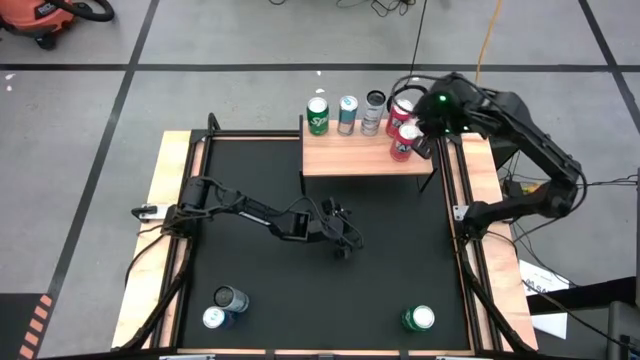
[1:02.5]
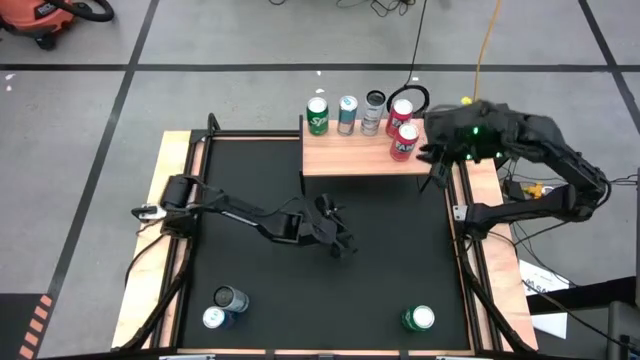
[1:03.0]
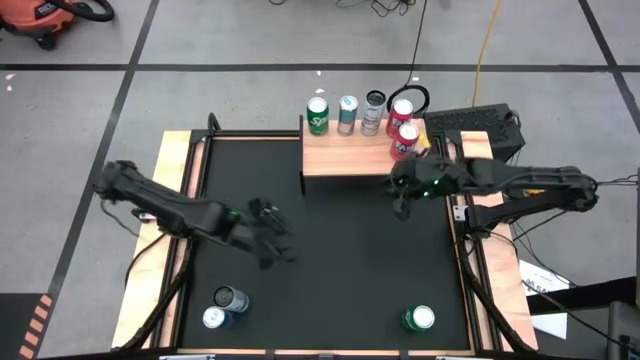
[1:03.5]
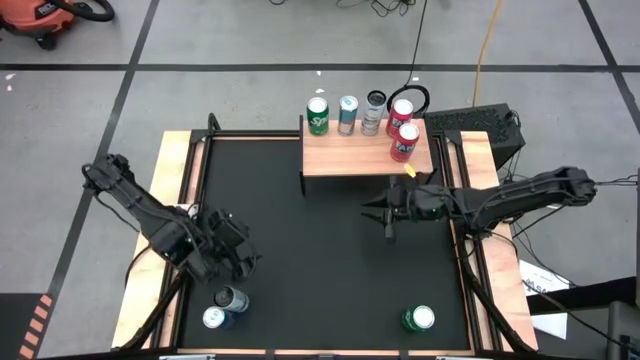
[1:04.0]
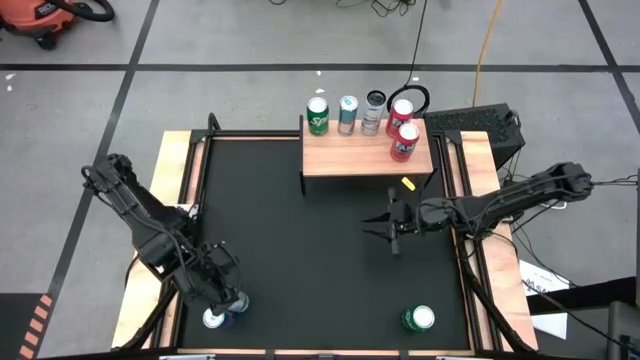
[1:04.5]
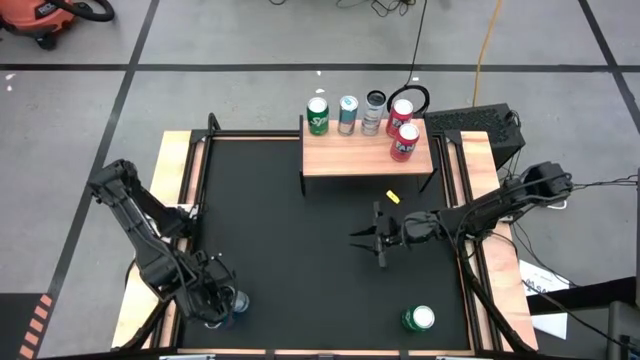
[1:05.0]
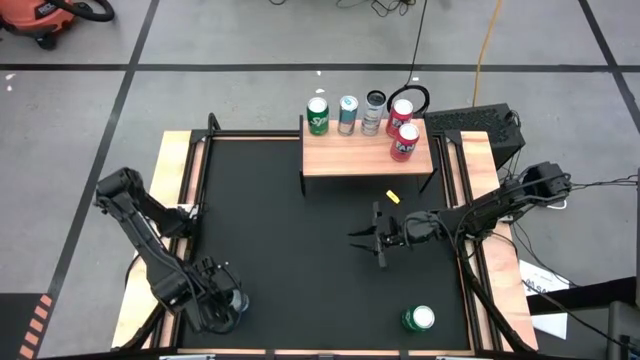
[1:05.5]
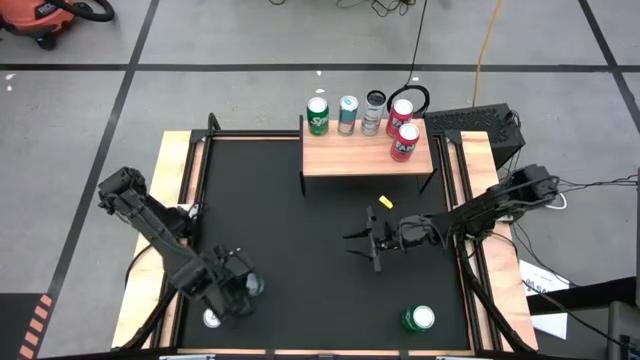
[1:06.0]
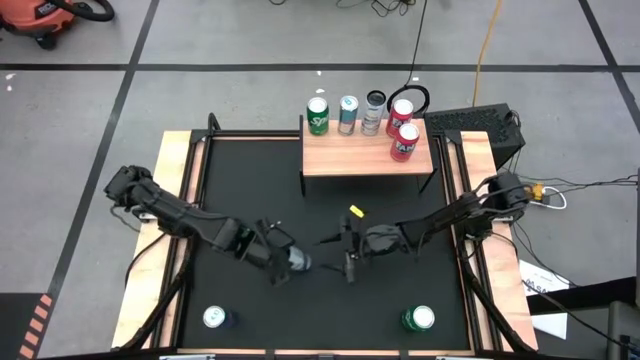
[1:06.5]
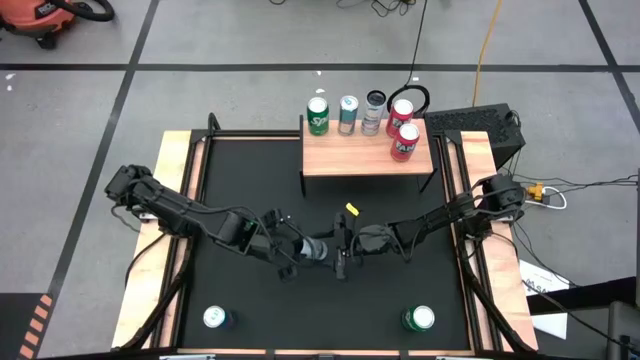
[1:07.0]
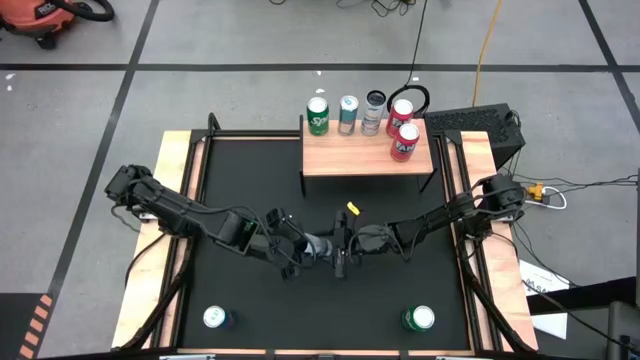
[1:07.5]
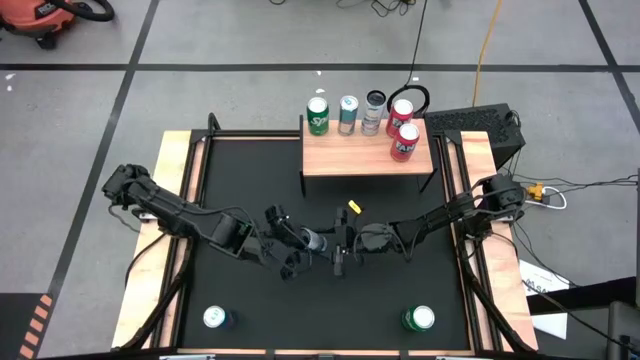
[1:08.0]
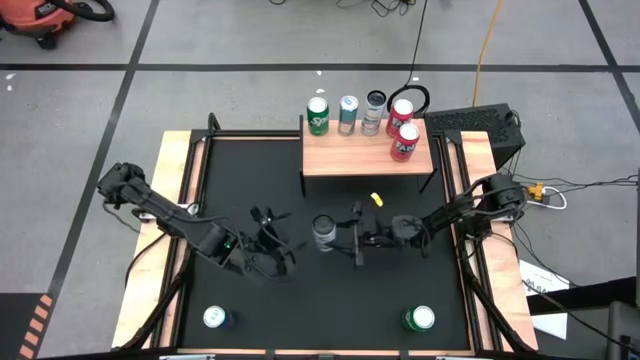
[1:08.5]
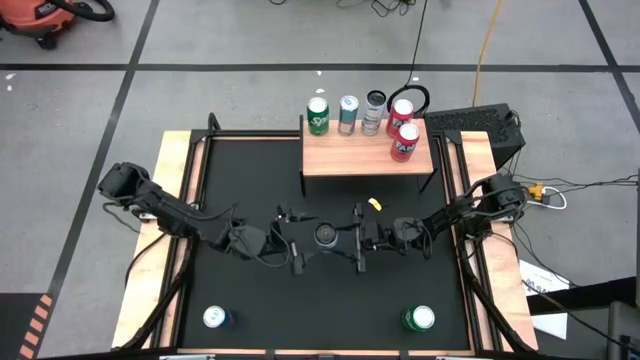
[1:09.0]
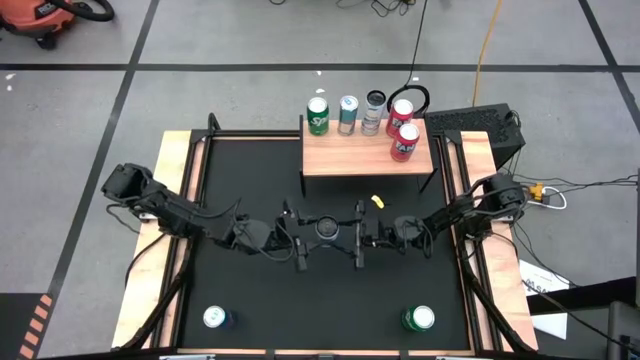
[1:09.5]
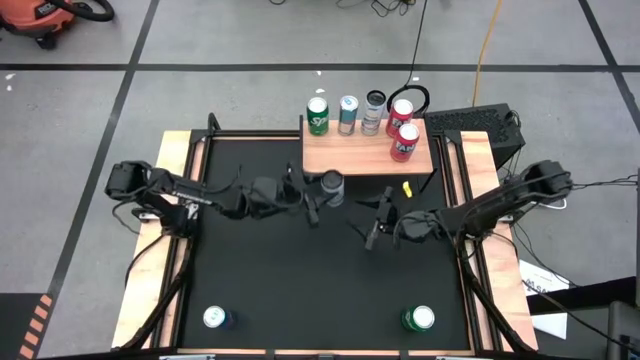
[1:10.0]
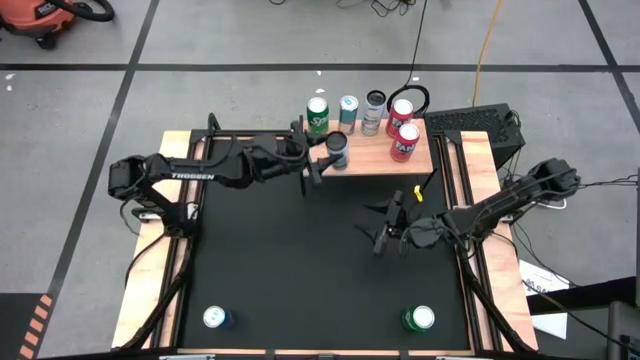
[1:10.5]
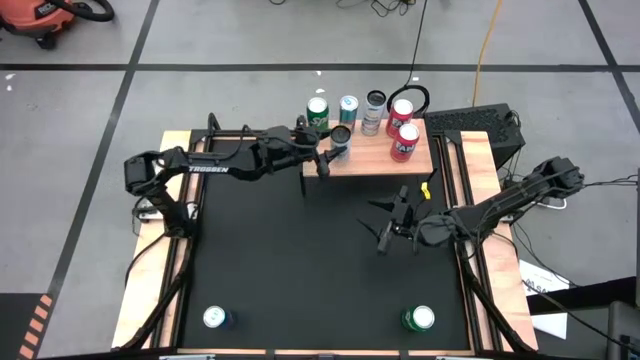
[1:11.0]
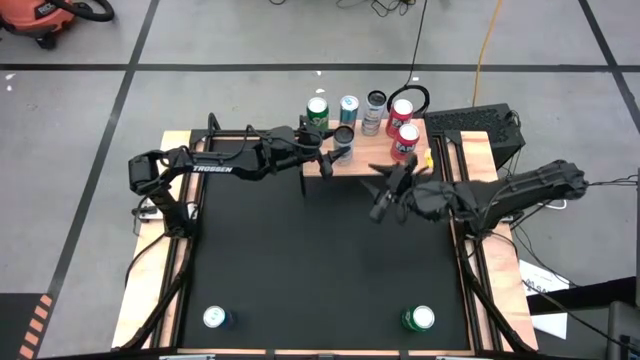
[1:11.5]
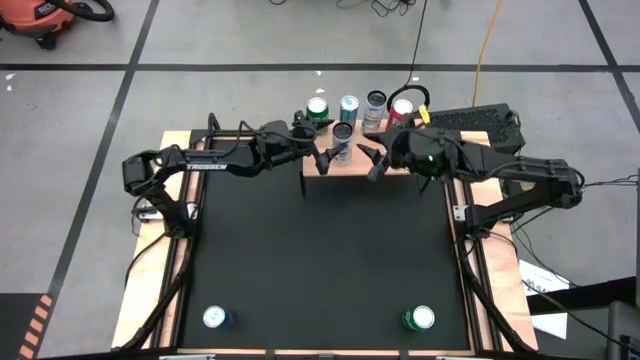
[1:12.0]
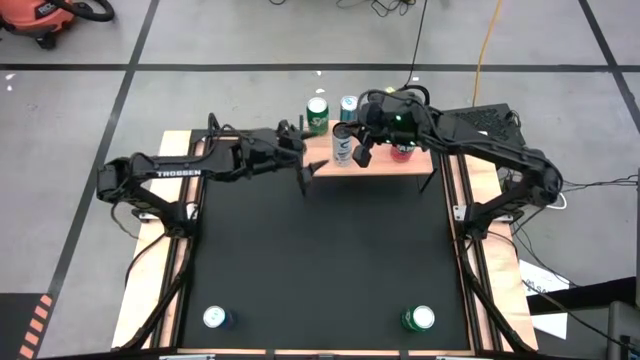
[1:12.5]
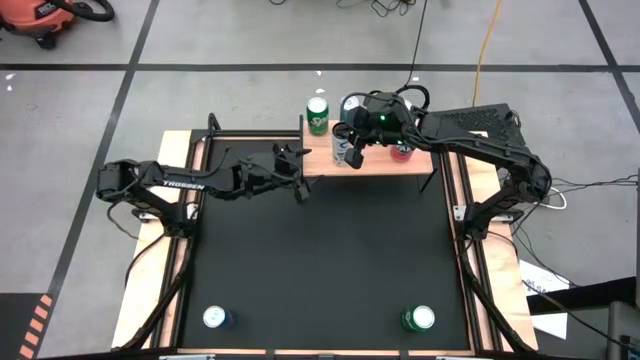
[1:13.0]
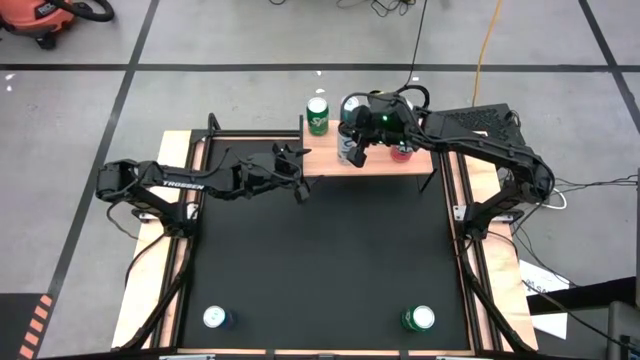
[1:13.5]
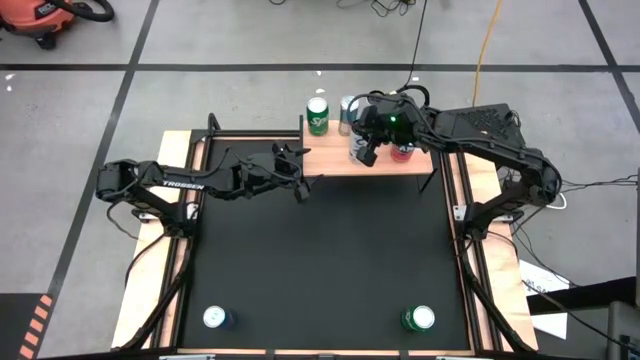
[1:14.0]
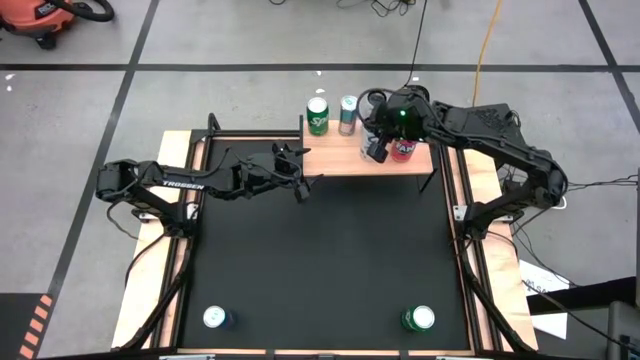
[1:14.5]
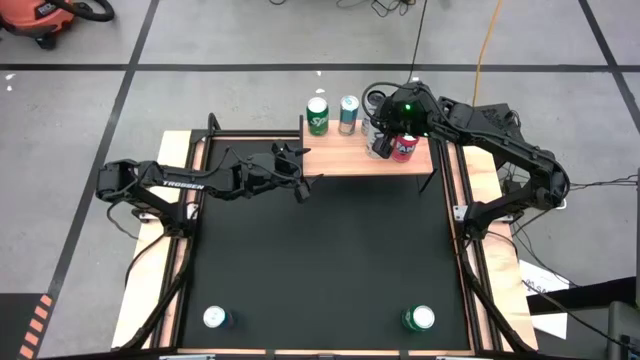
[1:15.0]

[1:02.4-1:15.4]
Task: Place canned beverage on shelf
Put the white-blue soda can on the shelf aligned with the other white-blue soda can

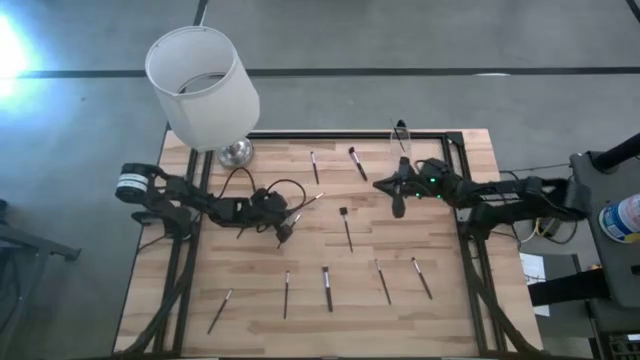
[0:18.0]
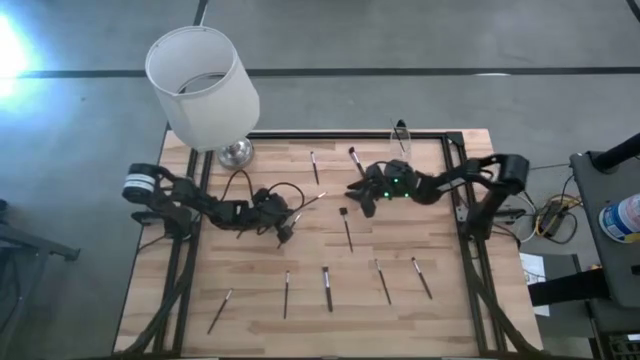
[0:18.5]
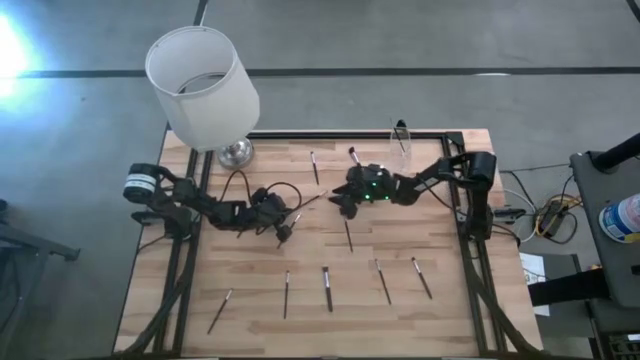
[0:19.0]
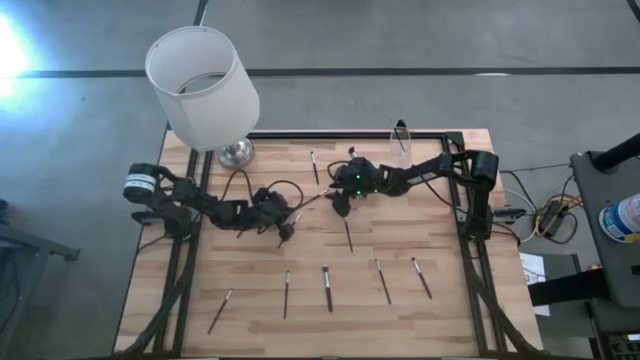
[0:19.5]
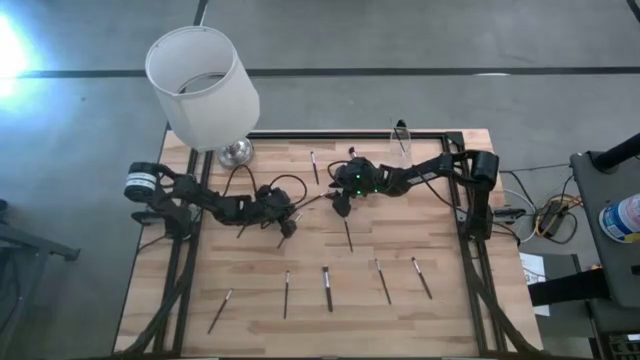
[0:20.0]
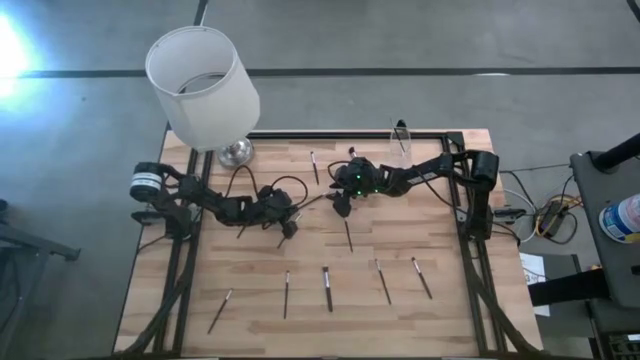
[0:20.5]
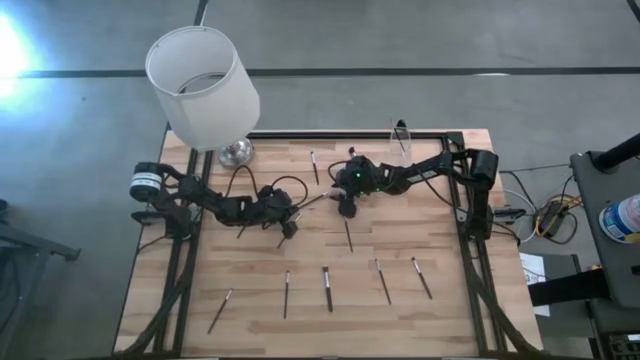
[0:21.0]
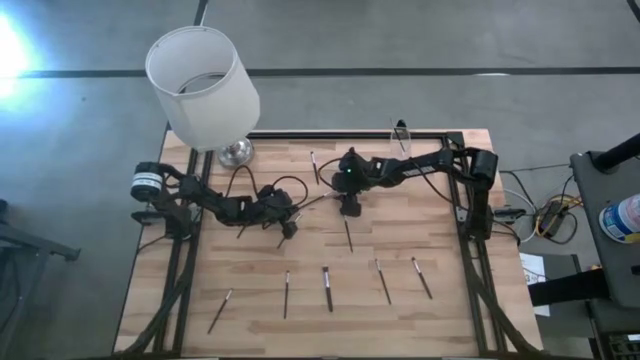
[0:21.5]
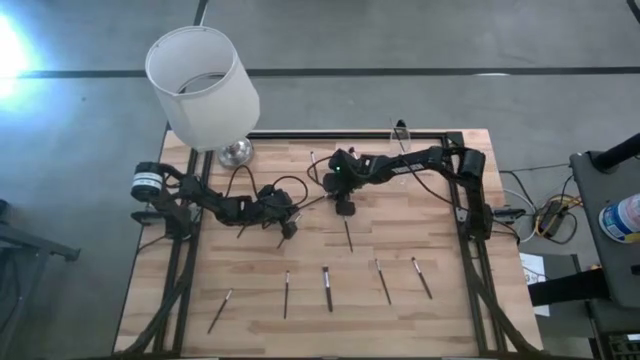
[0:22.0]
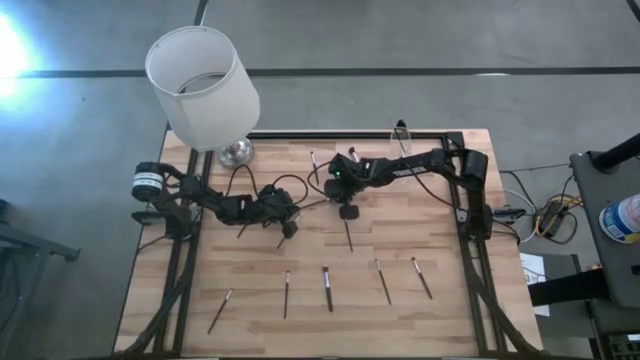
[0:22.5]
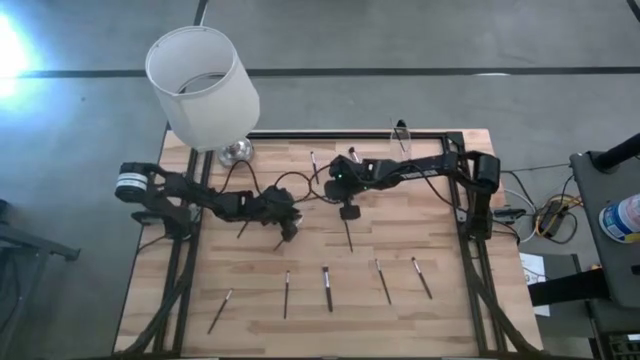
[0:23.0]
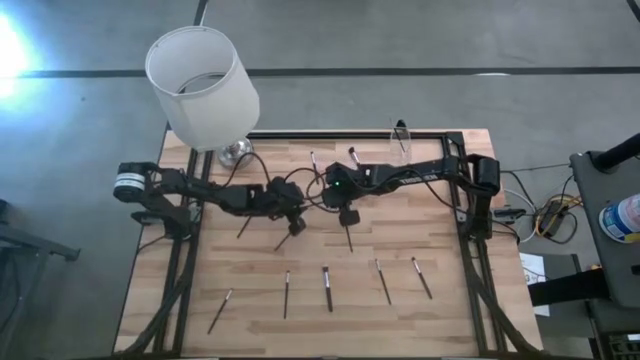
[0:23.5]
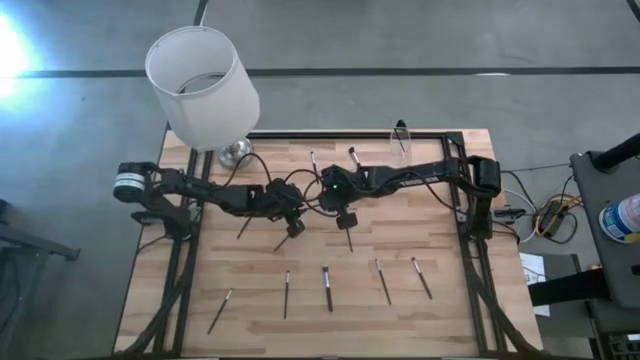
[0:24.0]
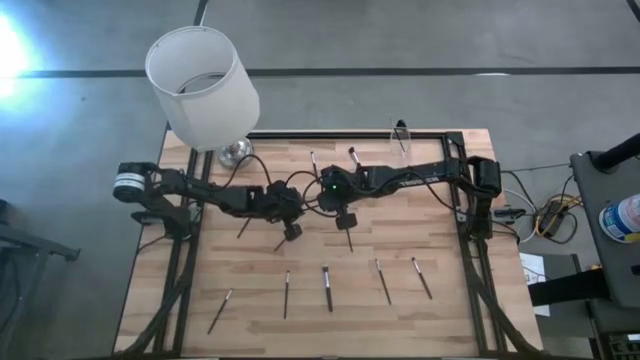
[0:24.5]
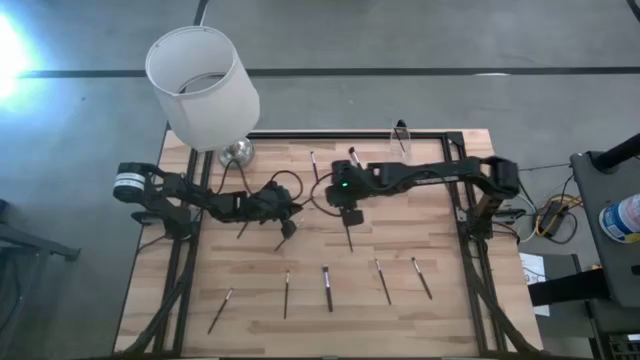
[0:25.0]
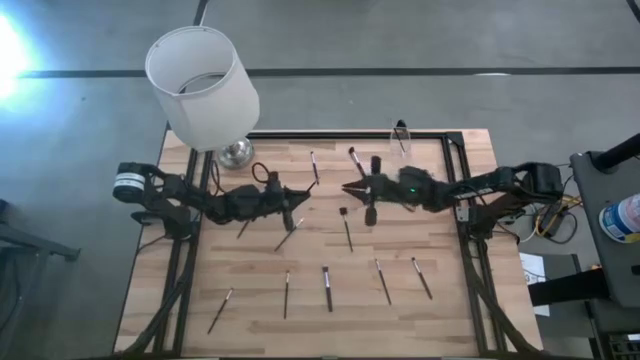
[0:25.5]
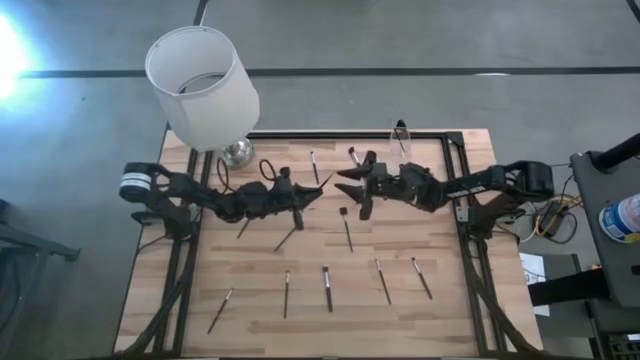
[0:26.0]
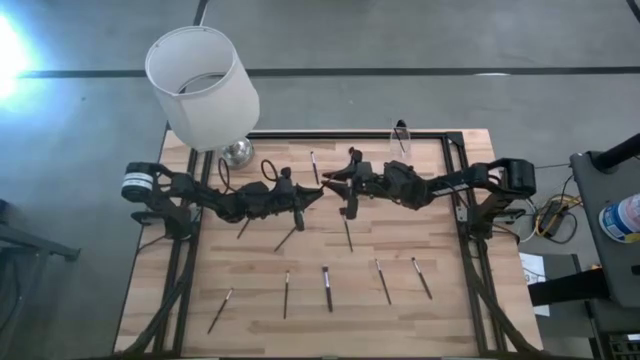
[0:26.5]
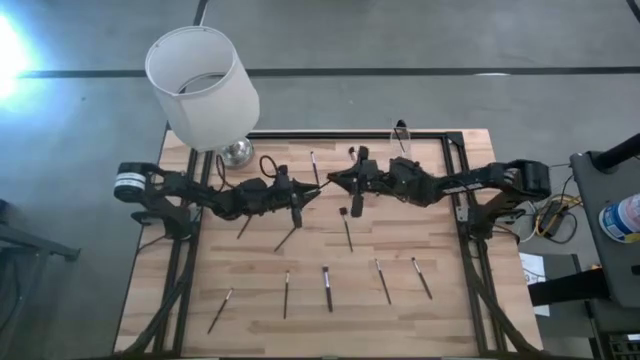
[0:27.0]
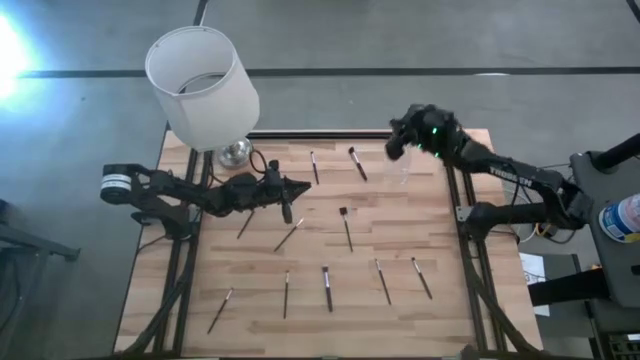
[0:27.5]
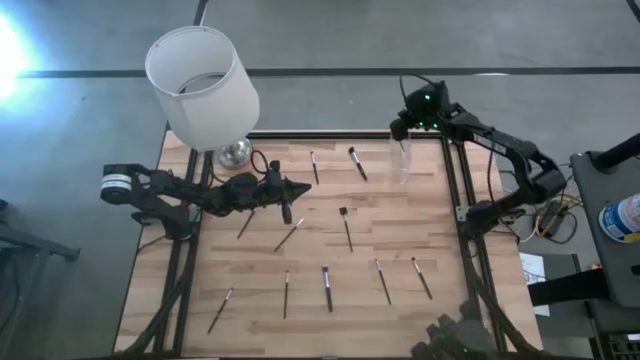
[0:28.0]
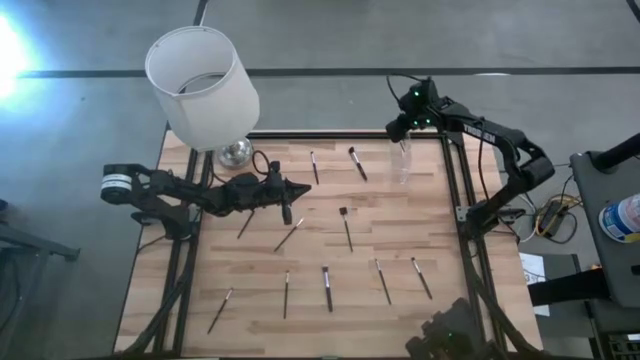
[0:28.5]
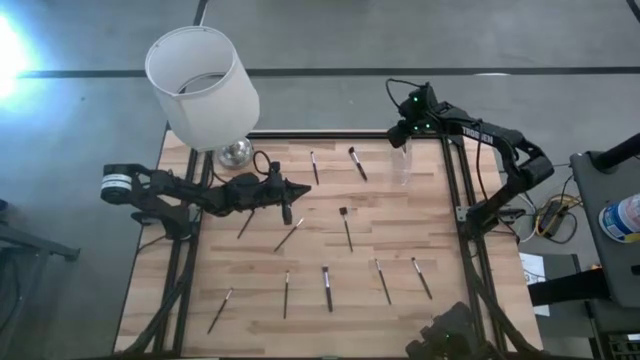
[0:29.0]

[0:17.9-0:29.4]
Task: Put items in baskets/containers
Put the eyeshadow brush into the transparent organizer
